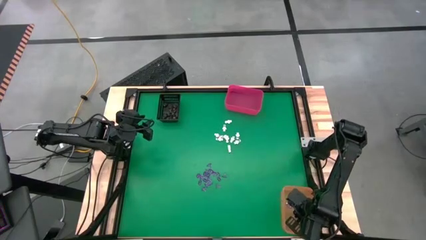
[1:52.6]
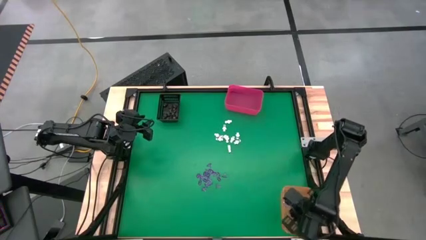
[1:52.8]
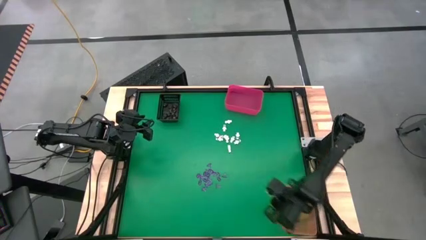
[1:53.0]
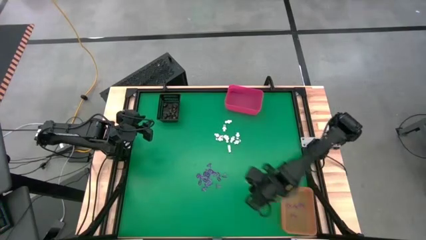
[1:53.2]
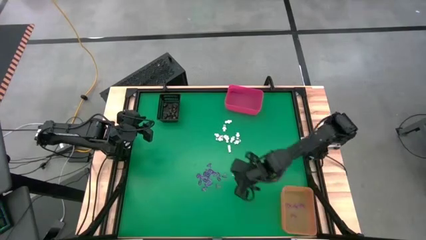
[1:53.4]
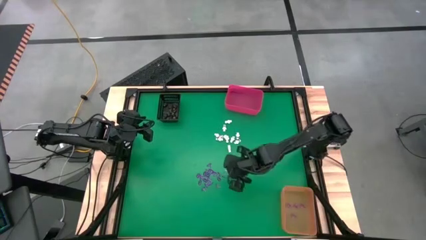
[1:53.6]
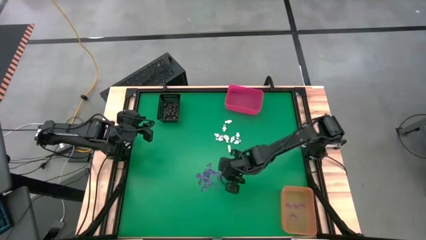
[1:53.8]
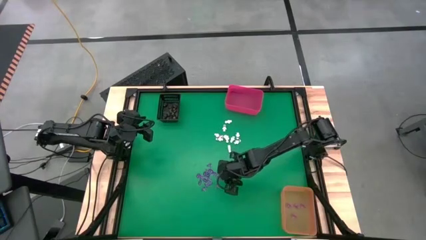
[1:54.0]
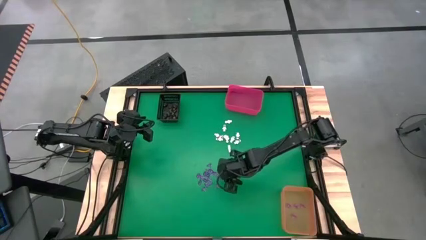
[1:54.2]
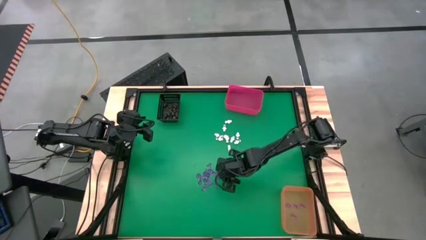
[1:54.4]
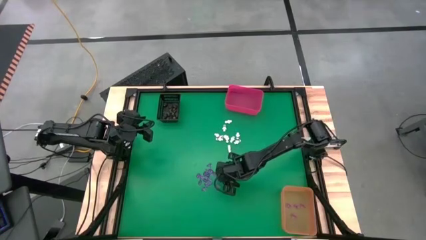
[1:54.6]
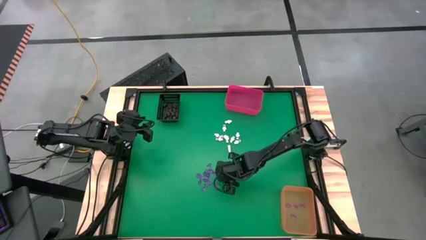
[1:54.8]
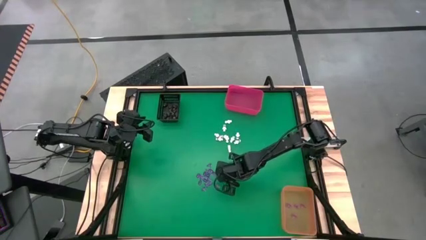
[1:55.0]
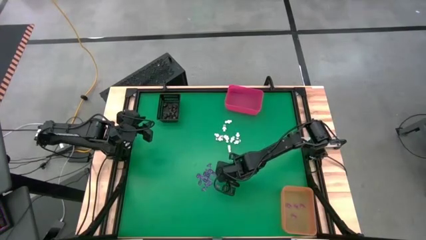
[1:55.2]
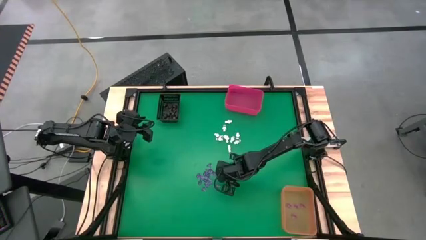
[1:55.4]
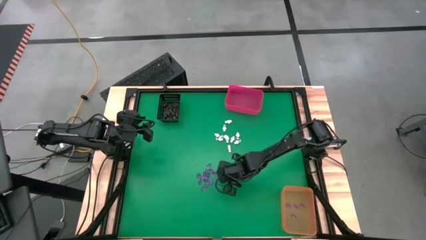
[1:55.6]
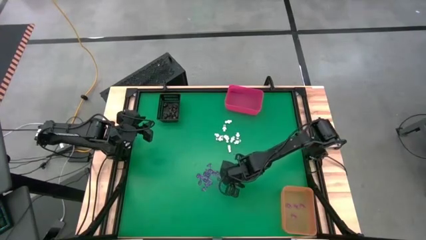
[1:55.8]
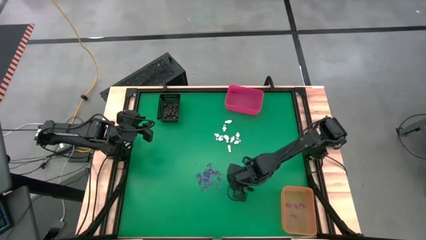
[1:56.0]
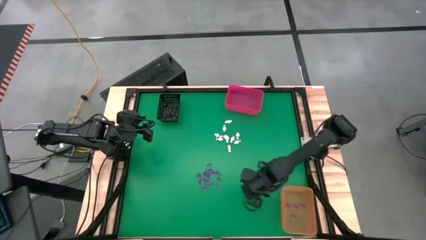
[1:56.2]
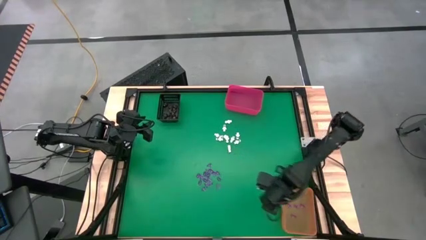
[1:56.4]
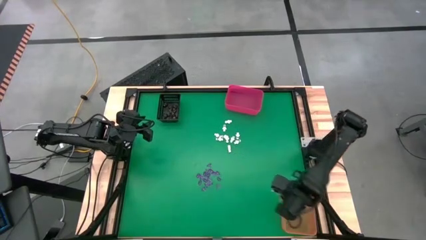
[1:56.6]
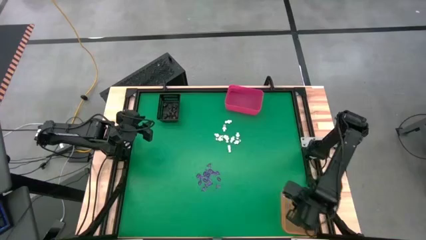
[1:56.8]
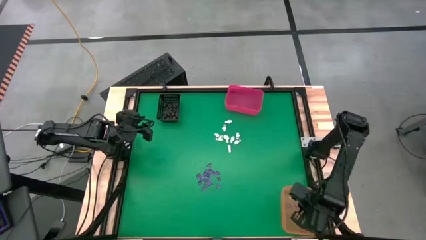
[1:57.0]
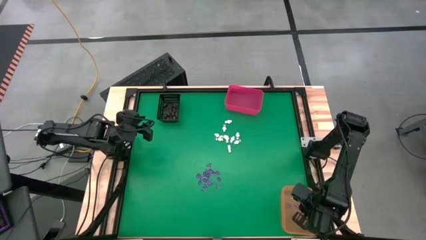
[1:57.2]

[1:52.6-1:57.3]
Task: Sort Halloween decoration
Put the pink witch hat toy into the orange bin

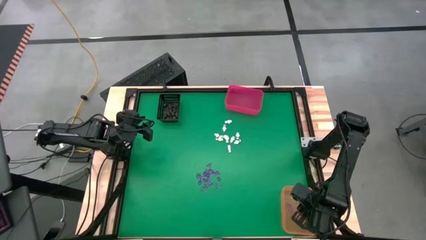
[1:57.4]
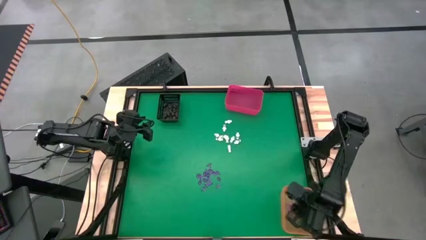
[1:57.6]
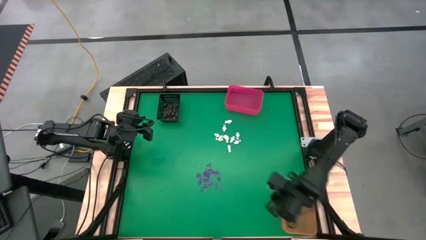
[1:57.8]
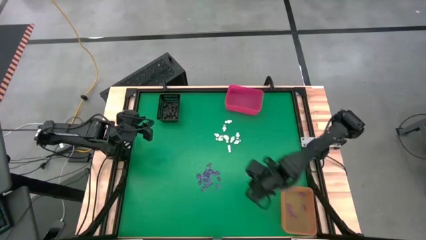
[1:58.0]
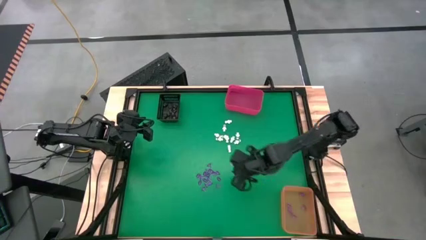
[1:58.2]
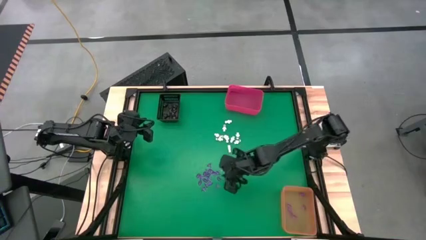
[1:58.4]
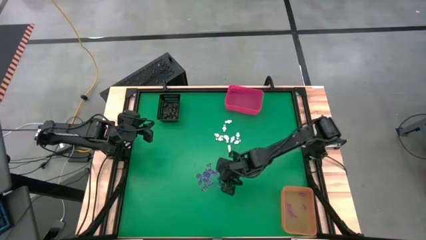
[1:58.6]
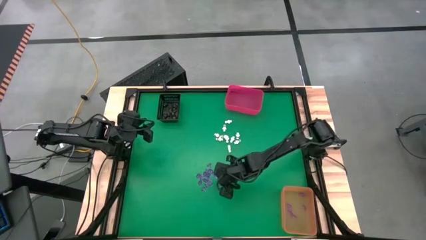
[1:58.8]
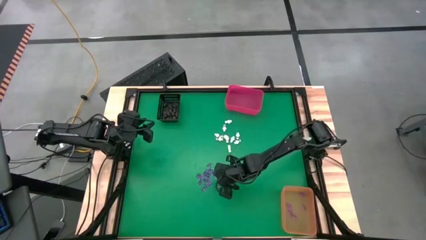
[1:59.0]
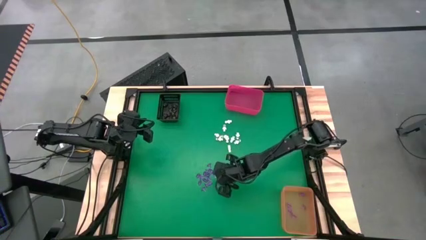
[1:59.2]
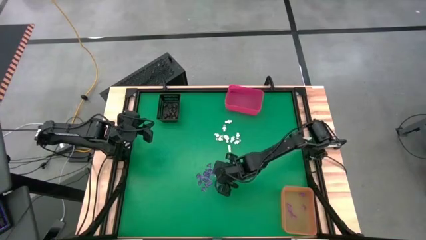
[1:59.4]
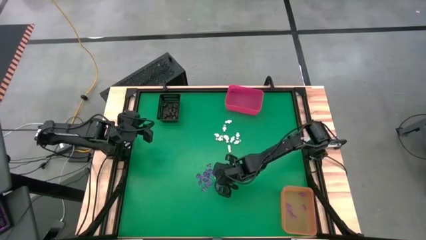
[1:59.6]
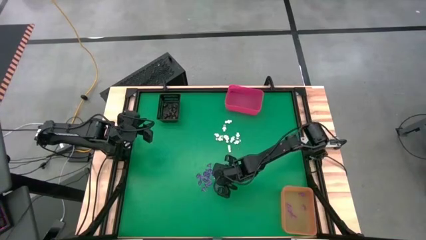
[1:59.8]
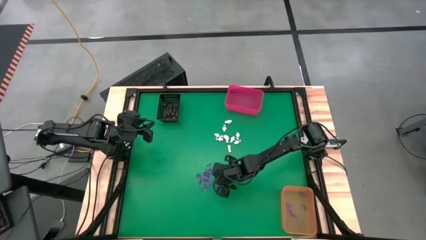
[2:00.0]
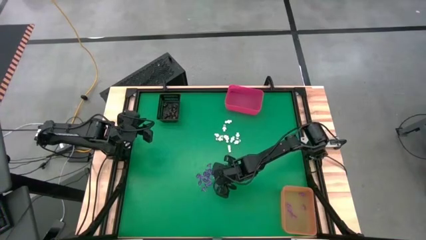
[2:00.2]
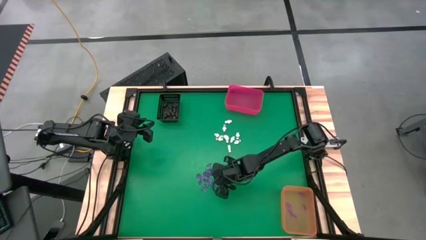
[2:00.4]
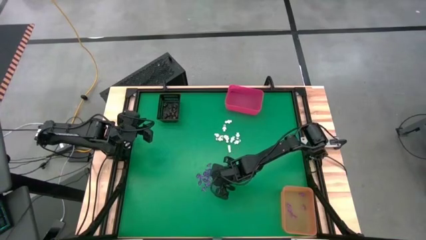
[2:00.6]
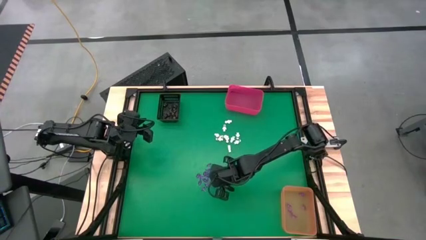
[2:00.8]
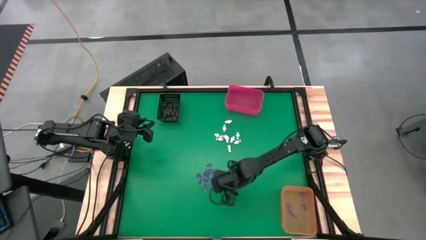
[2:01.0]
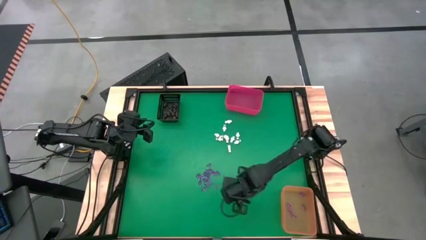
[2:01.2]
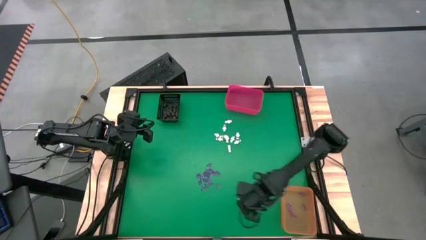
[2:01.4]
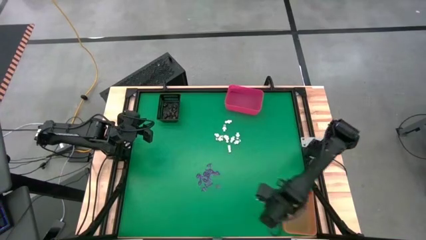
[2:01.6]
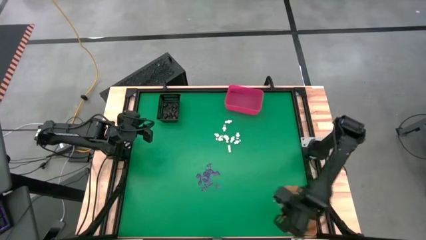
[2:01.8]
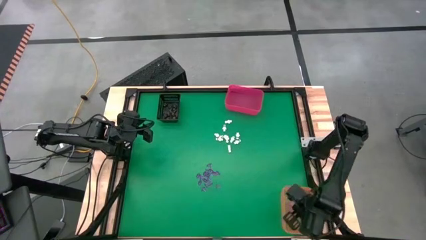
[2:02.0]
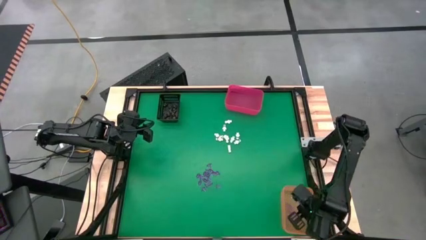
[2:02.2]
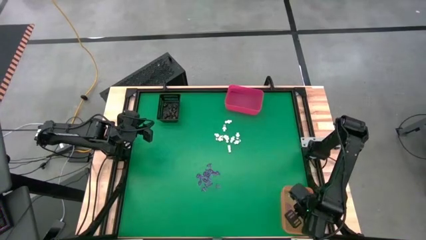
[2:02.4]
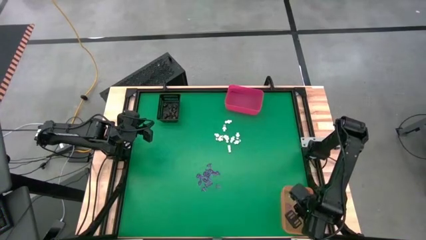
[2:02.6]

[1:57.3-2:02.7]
Put the pink witch hat toy into the orange bin

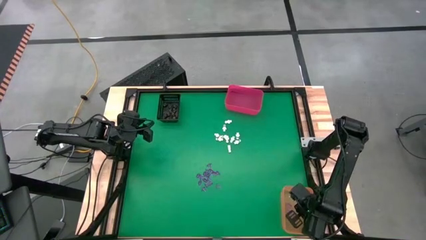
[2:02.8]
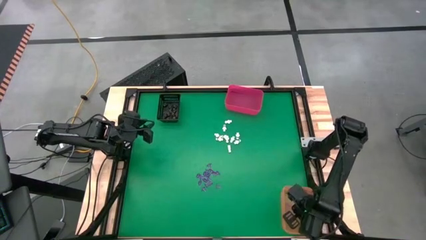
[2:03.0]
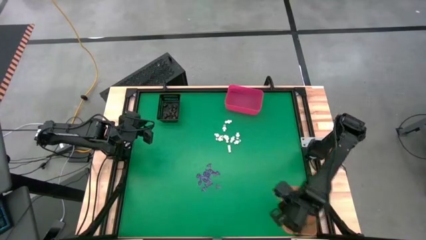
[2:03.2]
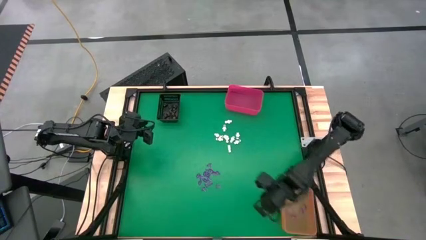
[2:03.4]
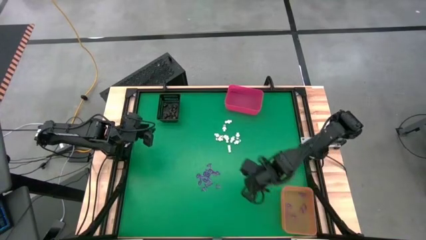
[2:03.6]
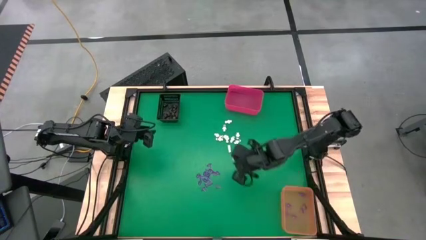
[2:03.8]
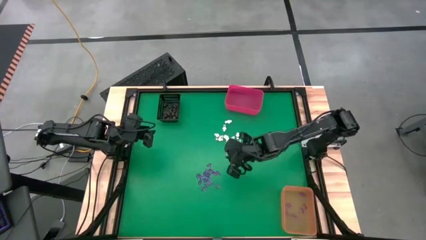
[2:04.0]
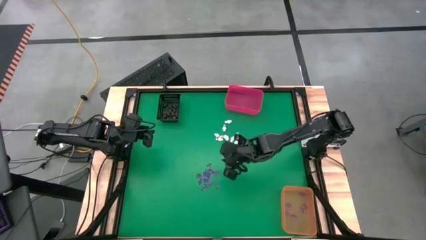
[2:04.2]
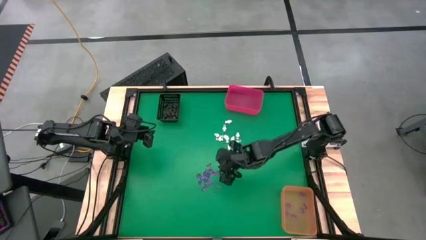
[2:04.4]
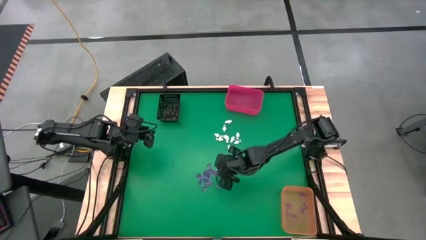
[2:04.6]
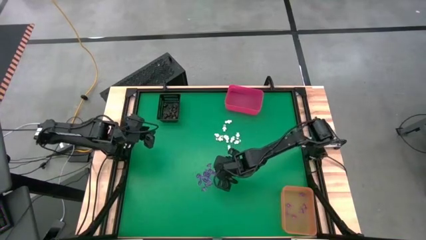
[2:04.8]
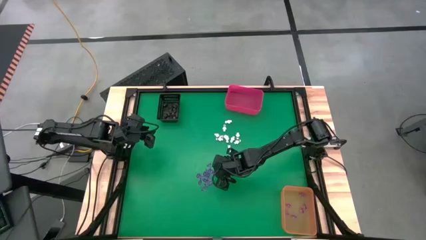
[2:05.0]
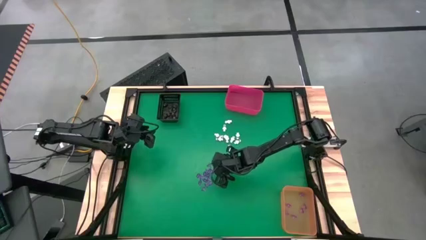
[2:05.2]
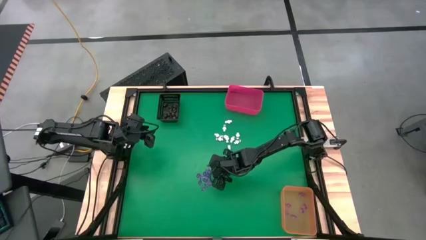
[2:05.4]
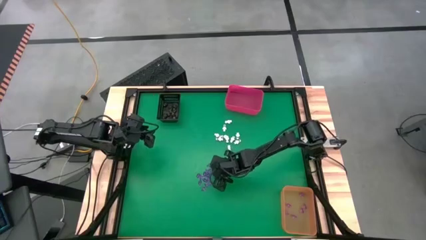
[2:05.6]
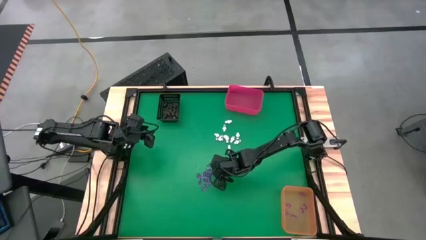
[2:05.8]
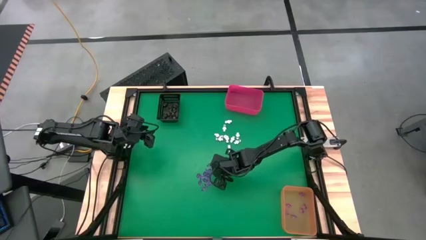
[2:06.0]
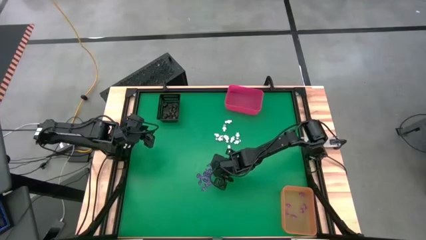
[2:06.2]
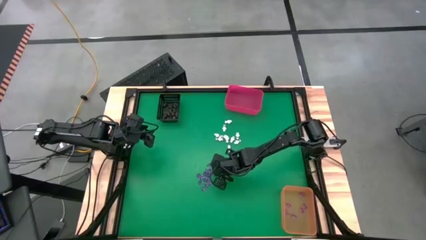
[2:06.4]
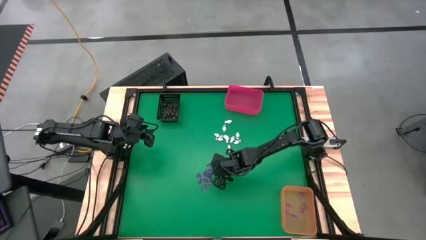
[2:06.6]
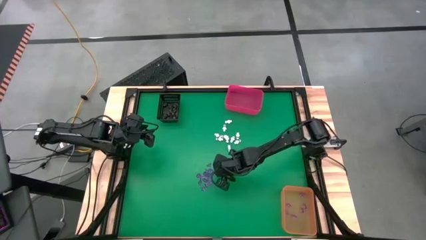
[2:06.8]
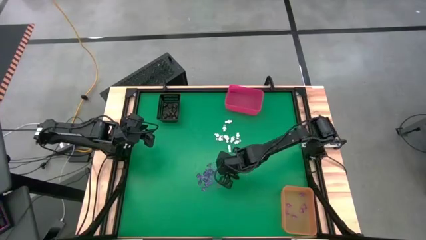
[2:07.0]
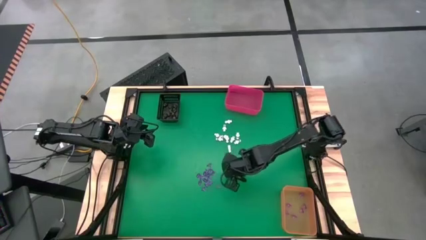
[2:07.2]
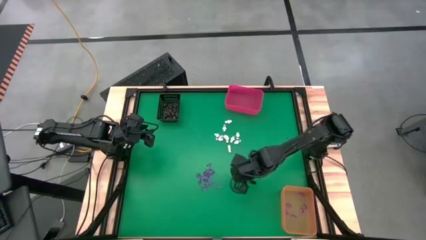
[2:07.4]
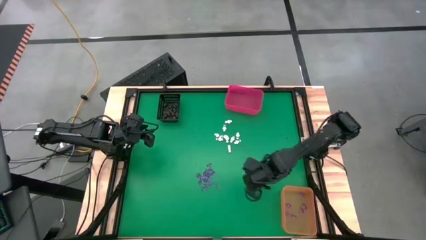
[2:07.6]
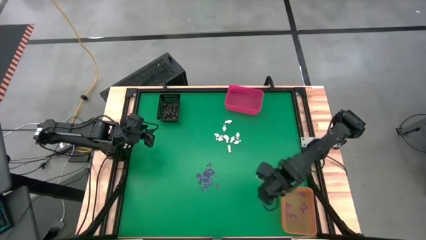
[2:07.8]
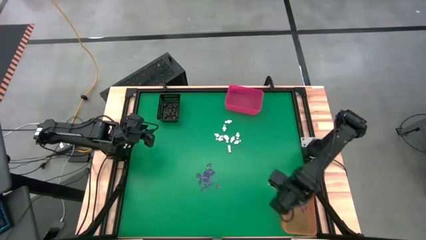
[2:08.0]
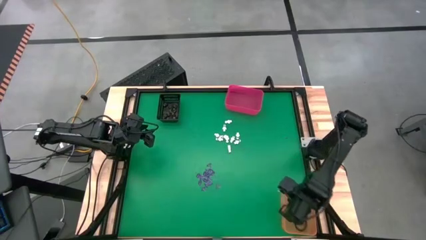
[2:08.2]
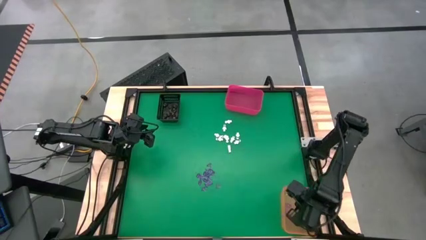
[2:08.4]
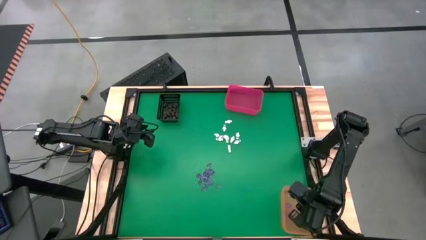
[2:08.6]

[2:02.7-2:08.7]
Put the pink witch hat toy into the orange bin
